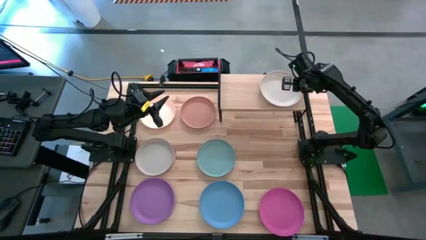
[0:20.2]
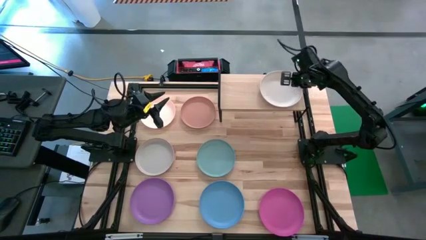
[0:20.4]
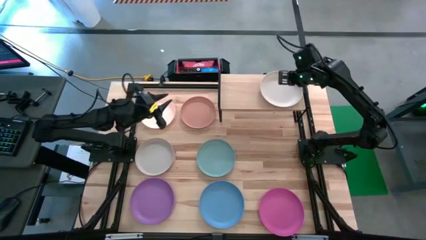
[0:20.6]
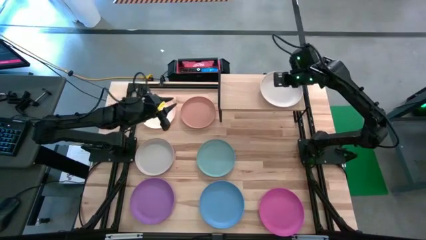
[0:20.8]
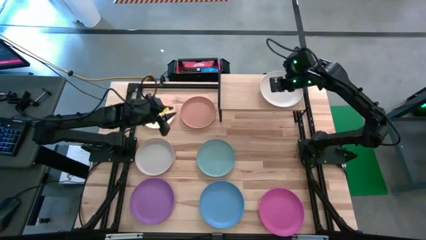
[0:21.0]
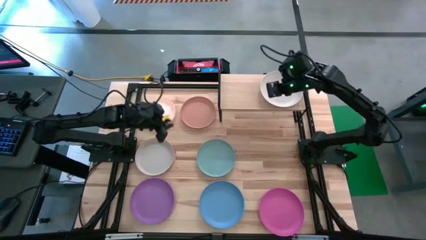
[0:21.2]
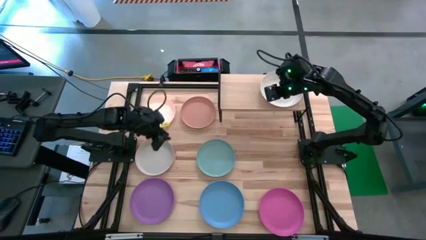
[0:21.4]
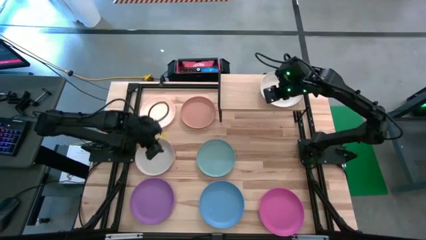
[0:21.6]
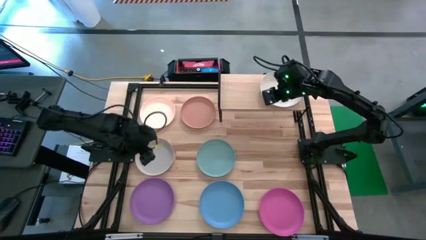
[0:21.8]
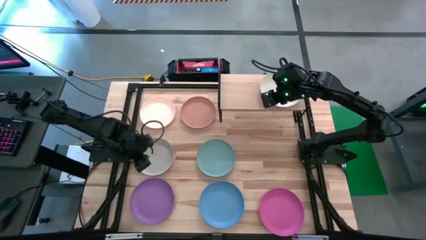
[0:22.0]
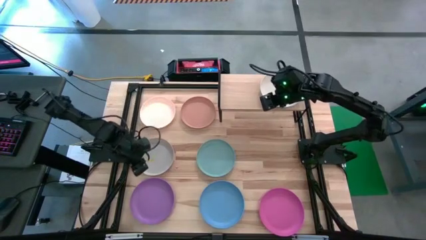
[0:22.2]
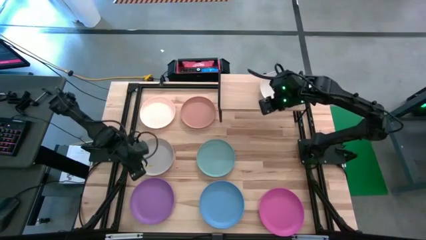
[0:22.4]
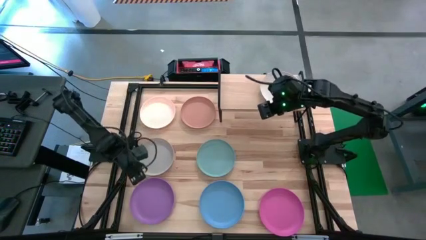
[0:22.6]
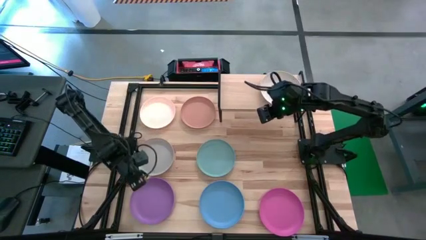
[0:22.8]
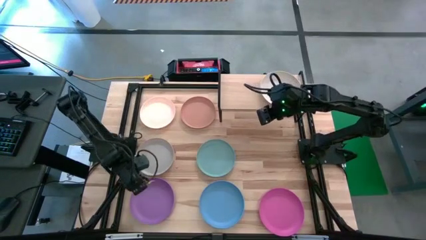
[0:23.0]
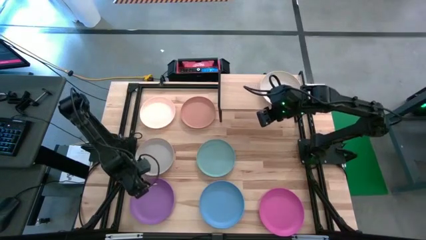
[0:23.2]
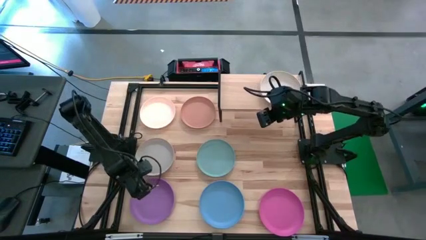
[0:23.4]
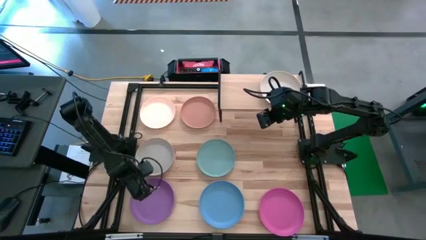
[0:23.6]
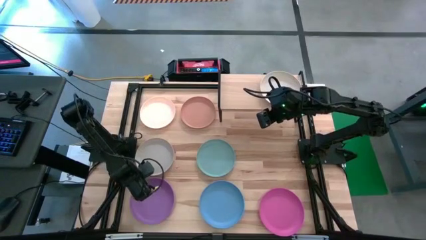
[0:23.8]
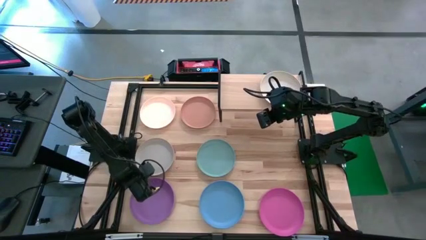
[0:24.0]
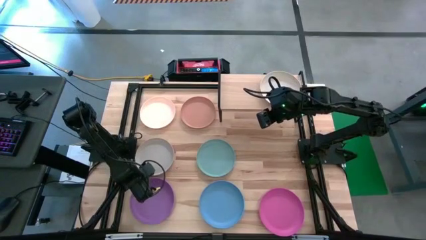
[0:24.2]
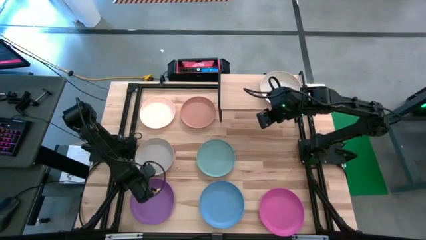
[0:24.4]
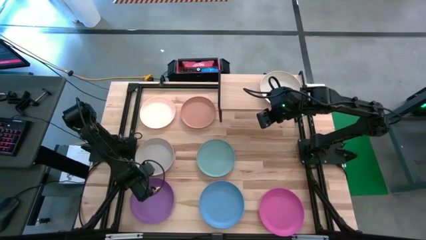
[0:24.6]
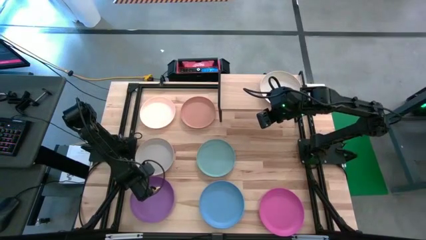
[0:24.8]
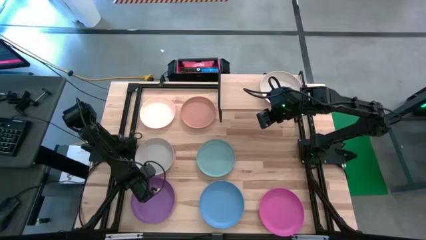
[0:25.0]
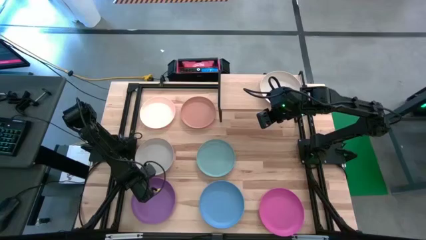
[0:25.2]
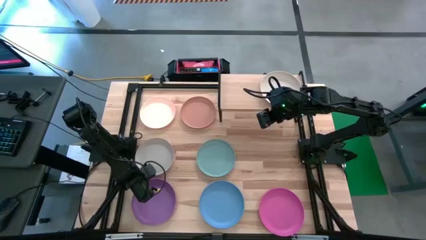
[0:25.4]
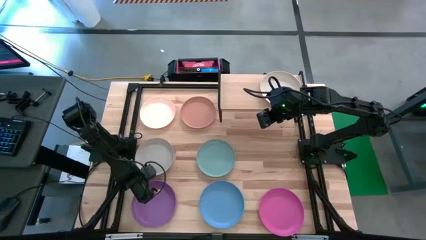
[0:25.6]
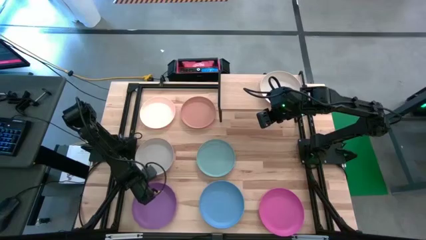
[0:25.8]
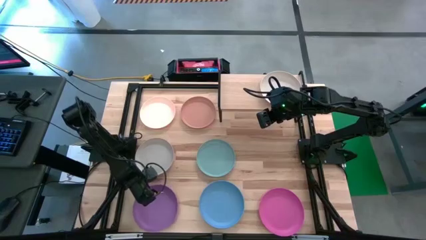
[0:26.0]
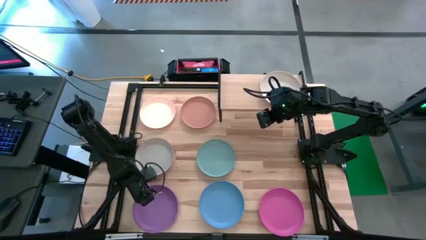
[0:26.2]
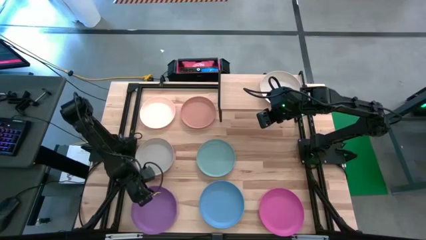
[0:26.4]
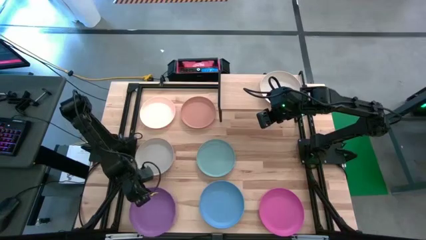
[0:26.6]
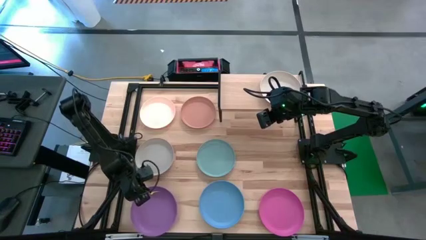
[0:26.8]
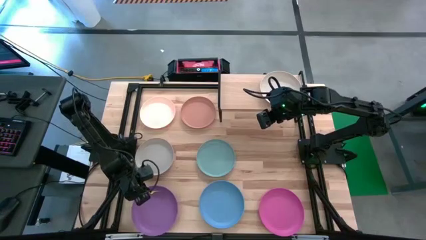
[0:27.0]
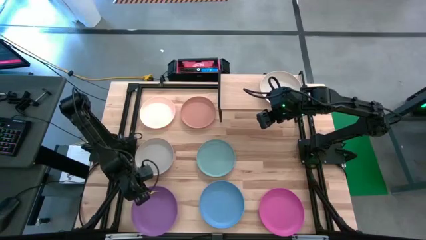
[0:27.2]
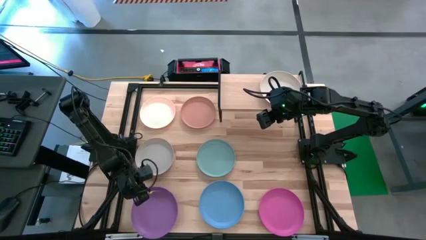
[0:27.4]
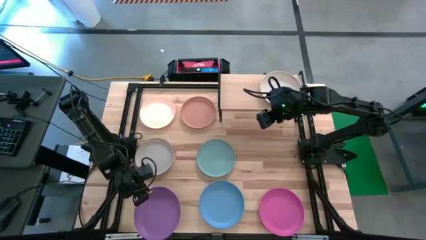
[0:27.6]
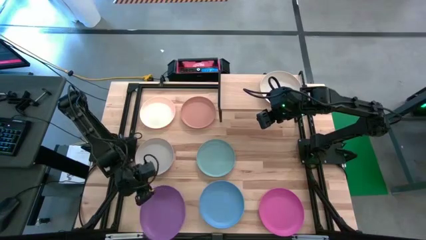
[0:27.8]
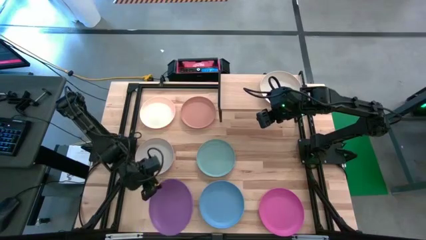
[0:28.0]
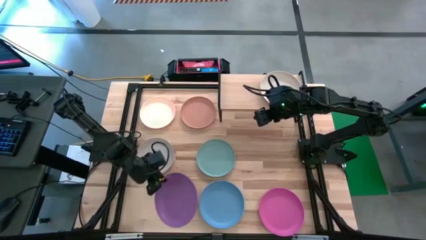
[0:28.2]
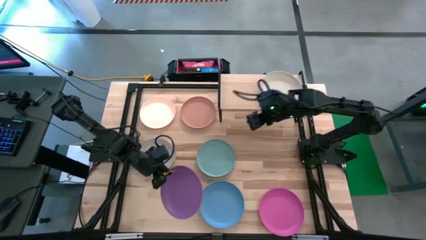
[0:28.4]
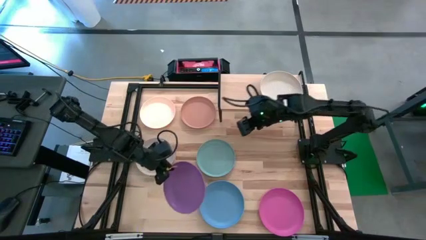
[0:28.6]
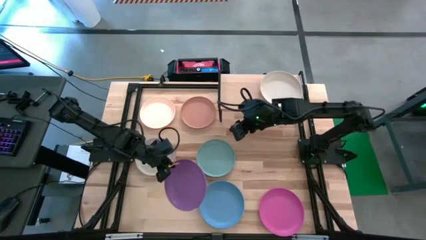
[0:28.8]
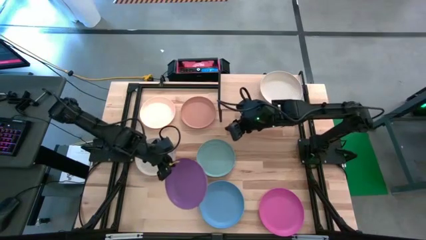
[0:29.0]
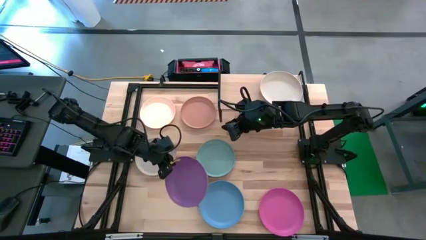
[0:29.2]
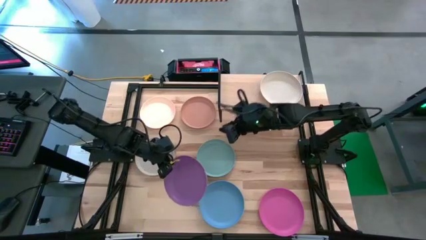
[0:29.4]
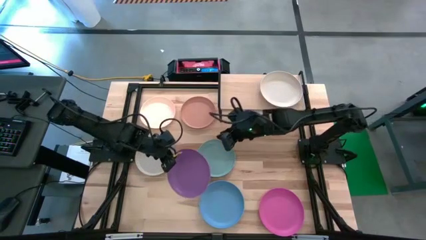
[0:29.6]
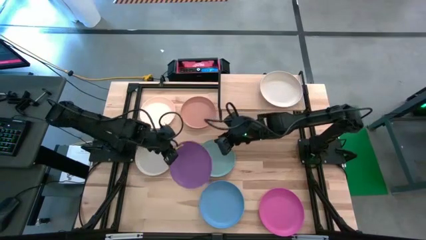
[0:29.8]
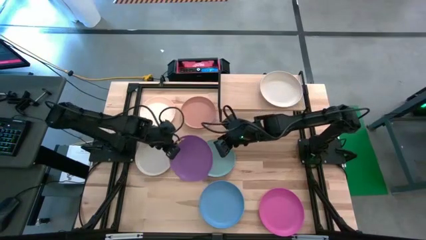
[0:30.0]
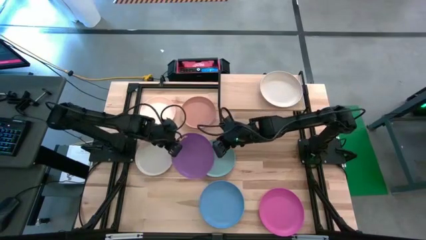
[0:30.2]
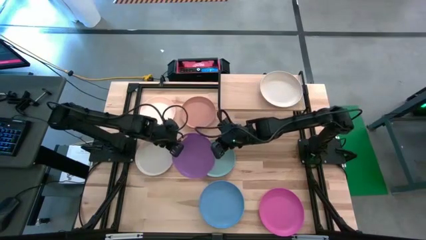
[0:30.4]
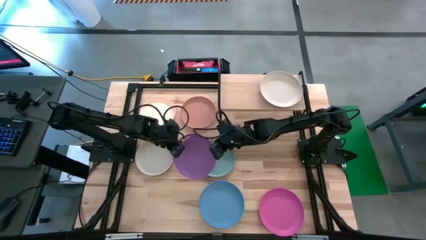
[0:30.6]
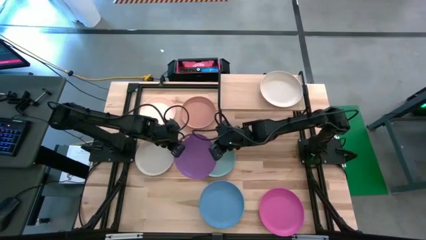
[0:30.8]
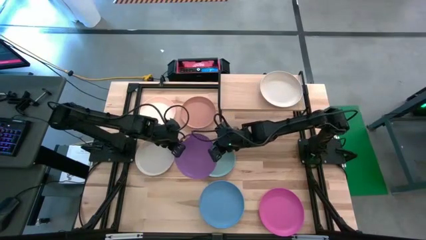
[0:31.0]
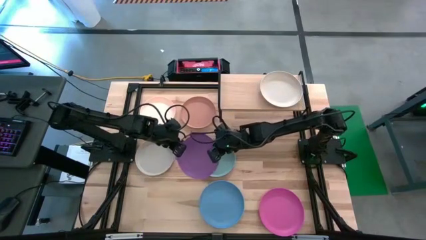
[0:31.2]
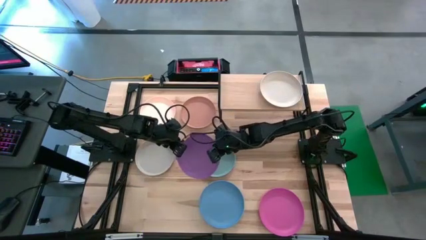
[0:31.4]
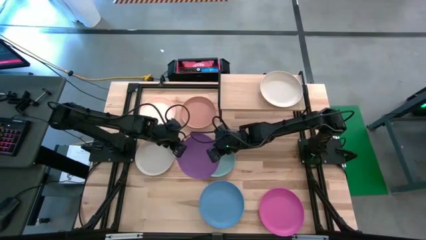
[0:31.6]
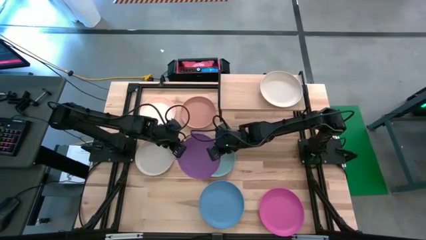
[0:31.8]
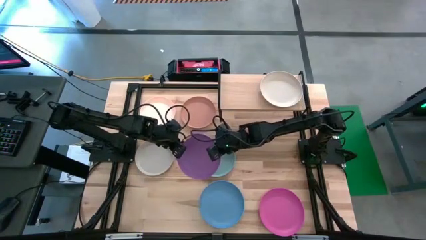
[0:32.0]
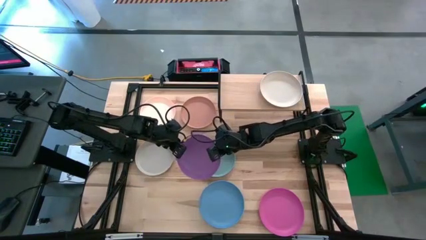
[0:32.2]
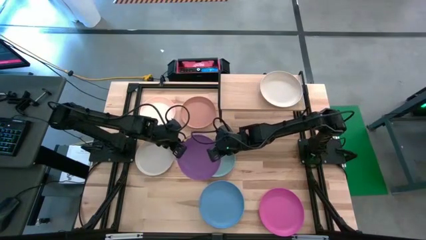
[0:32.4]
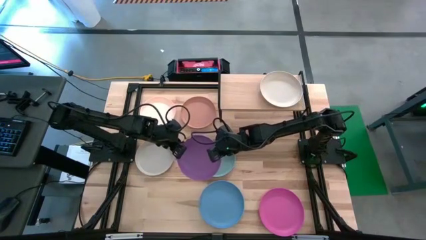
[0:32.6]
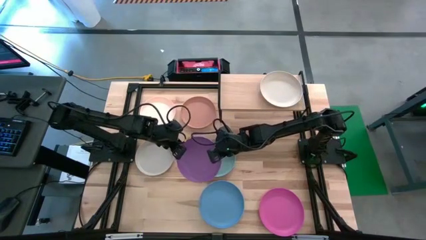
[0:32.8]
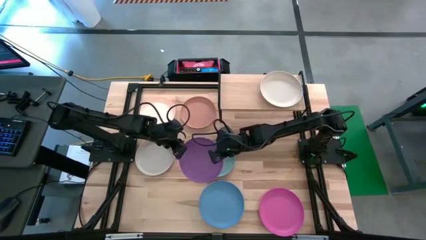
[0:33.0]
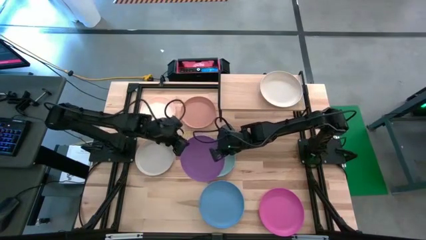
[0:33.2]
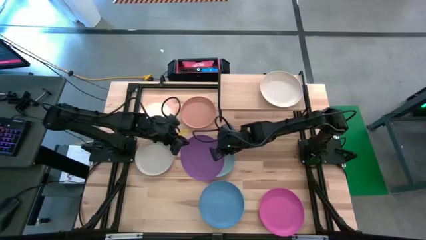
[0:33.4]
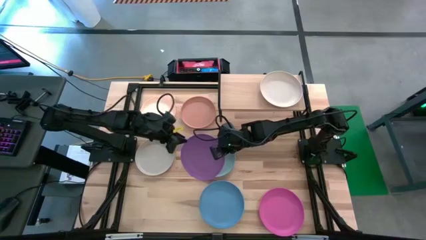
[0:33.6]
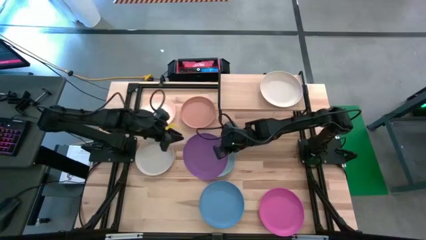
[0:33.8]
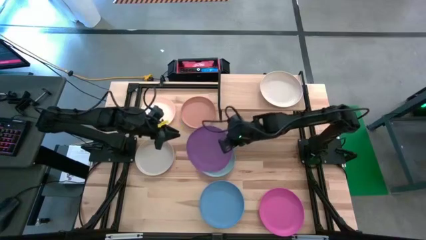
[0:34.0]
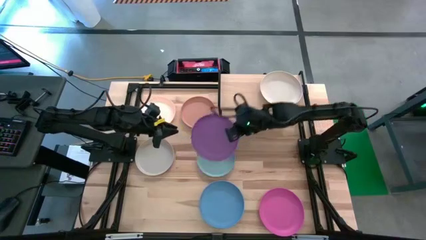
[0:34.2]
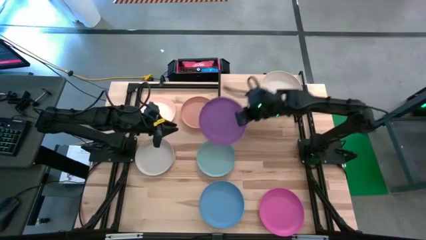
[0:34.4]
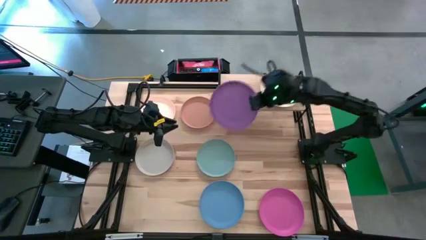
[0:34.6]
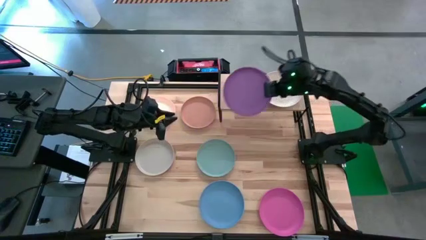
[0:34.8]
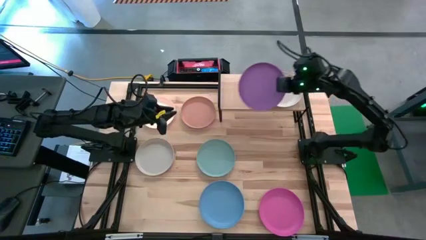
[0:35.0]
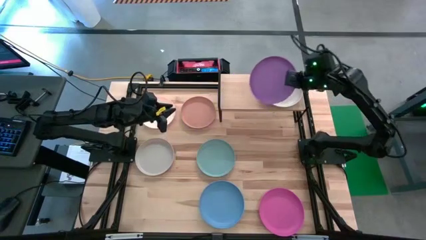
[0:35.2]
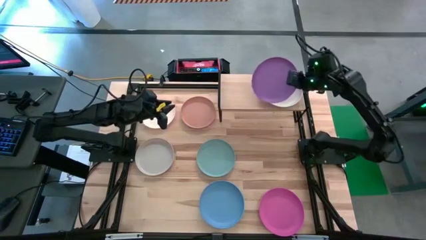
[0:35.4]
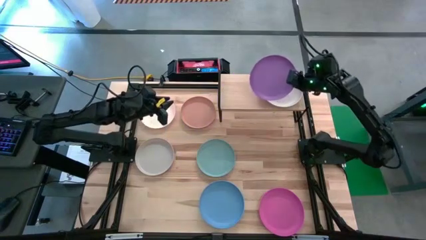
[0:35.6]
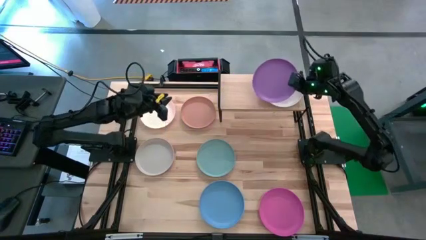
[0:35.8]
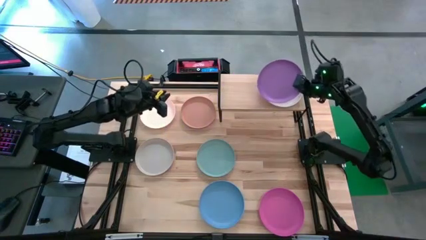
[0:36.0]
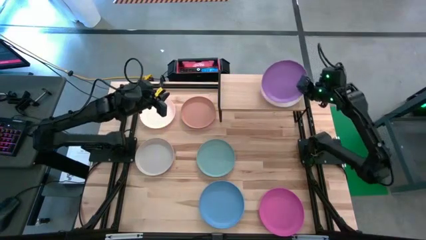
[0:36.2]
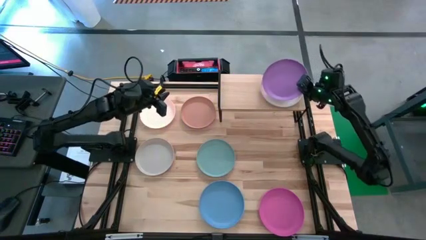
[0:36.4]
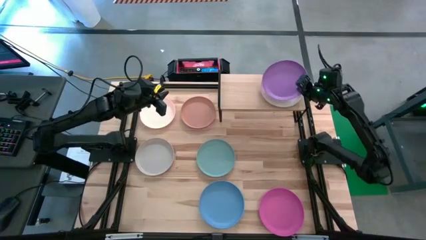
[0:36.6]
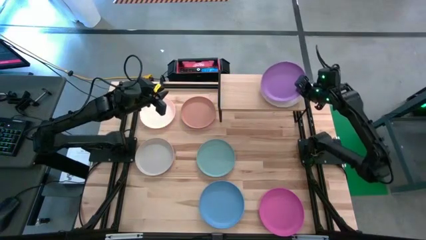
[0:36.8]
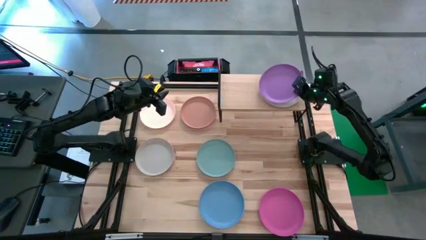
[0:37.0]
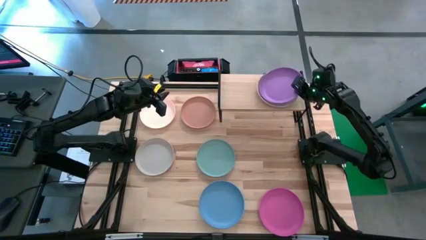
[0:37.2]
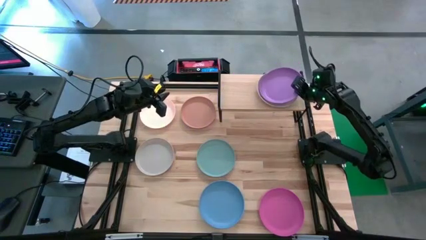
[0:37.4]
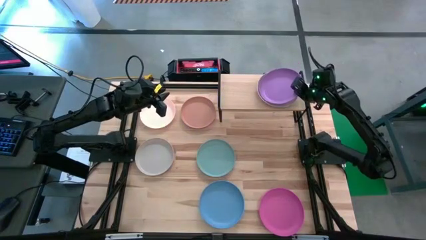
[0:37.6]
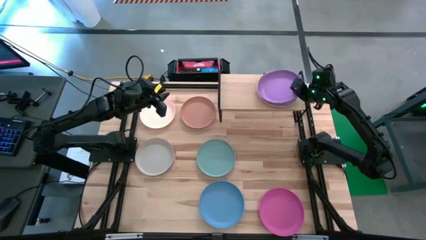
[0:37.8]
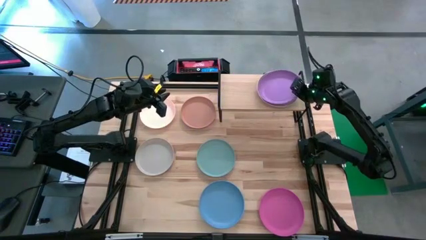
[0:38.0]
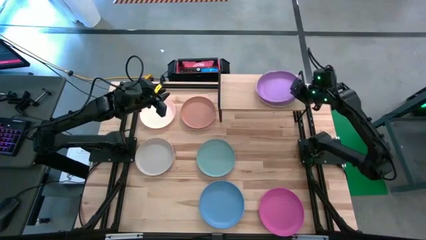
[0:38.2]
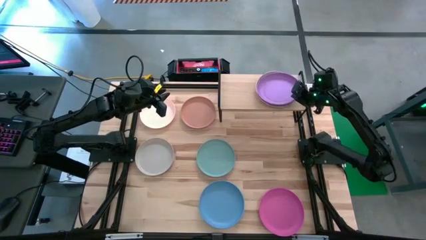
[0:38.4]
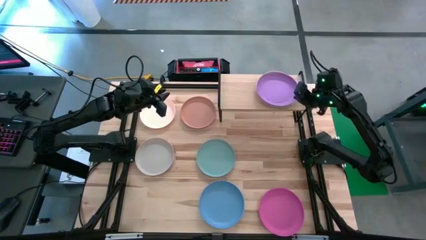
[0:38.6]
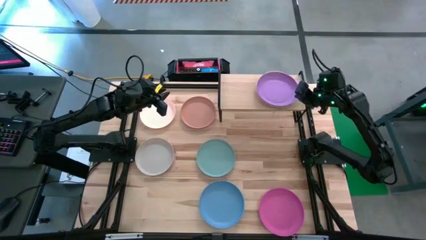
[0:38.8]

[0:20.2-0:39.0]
Task: Place and stack plates onto a shelf
Stack the purple plate on top of the beige plate on the shelf
